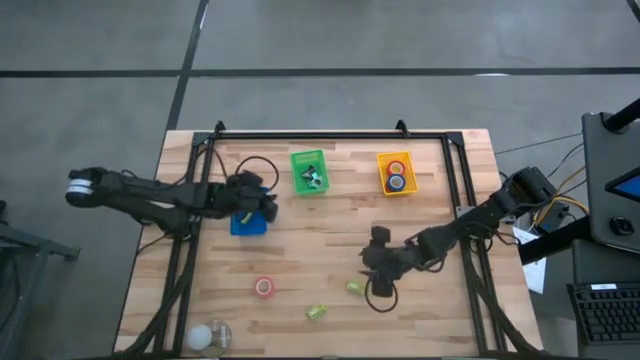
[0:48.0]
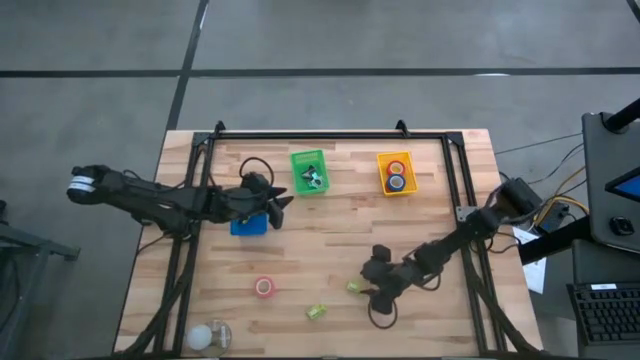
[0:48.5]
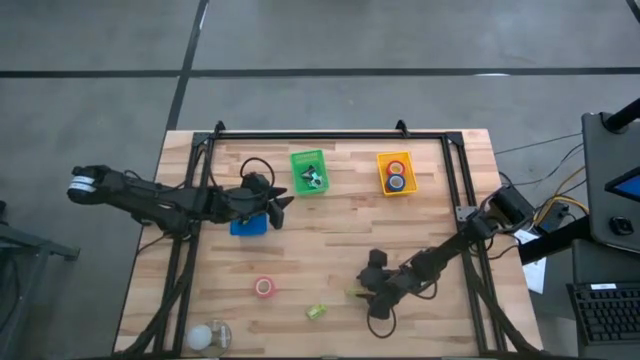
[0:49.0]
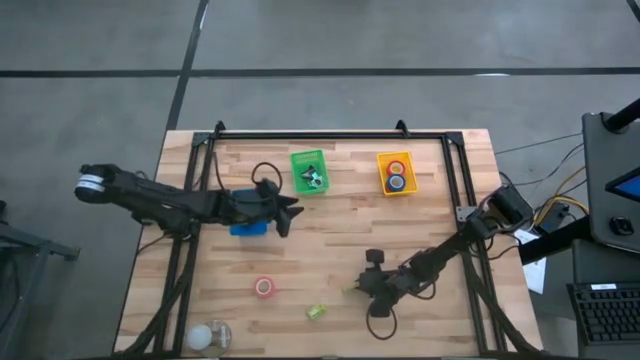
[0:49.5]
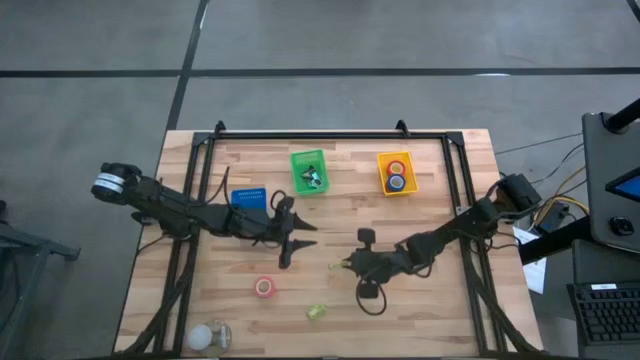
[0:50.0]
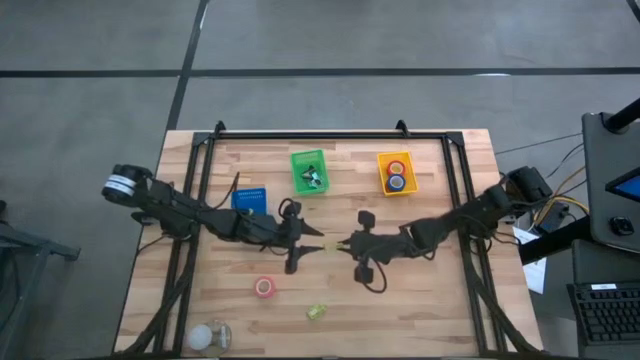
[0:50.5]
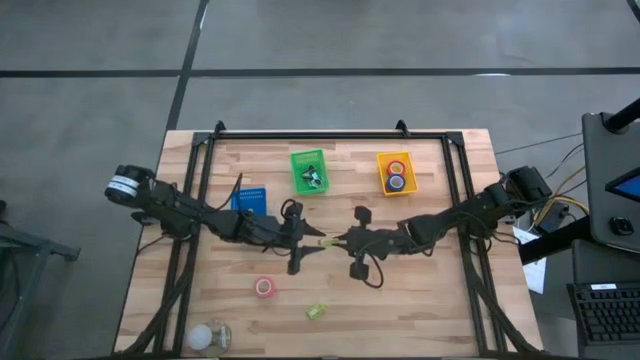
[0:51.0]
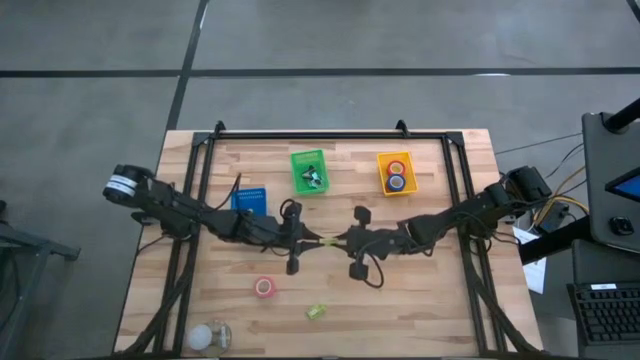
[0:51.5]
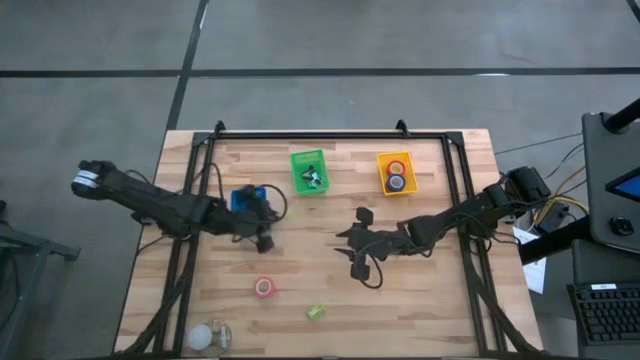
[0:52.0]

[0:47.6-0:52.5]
Task: Pick and place Stapler, Stapler remover, tape
Put the right green staple pin box into the blue bin

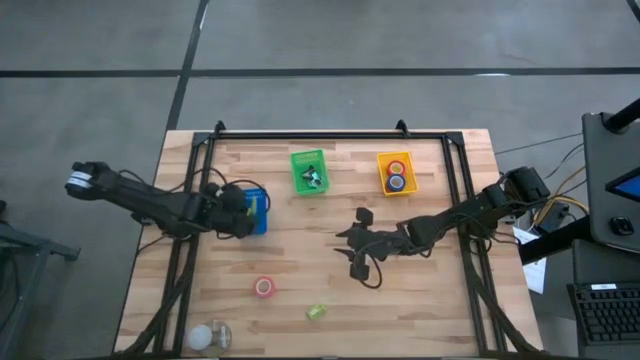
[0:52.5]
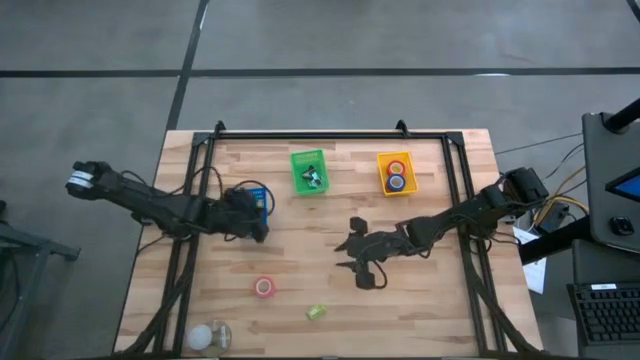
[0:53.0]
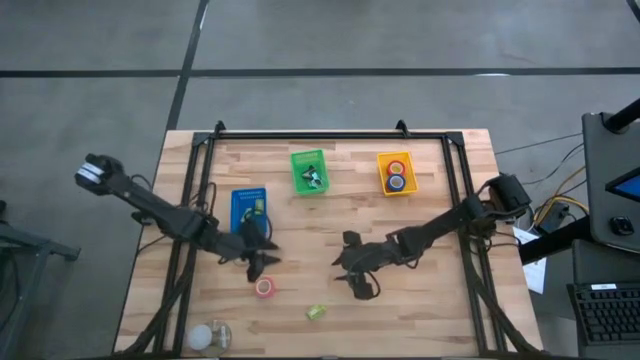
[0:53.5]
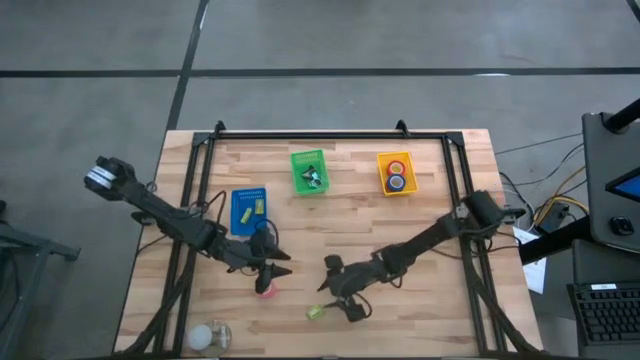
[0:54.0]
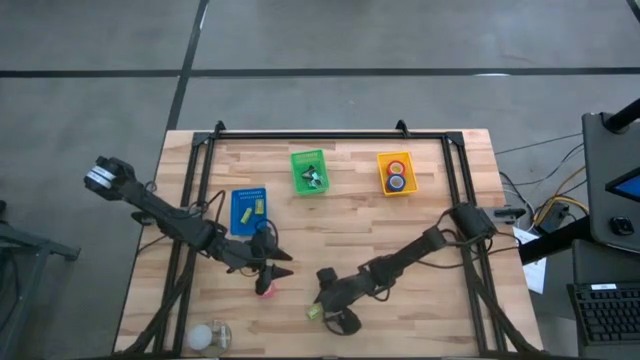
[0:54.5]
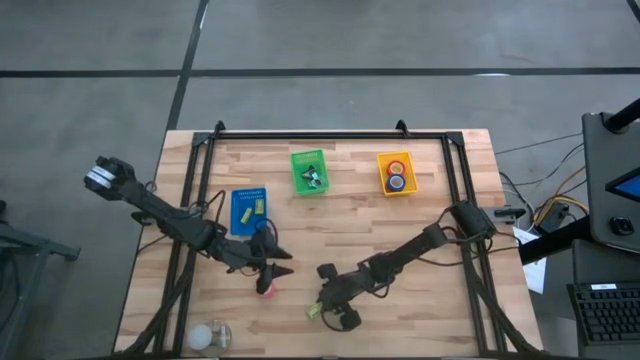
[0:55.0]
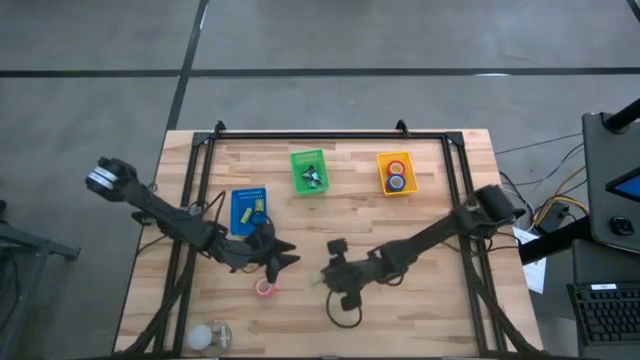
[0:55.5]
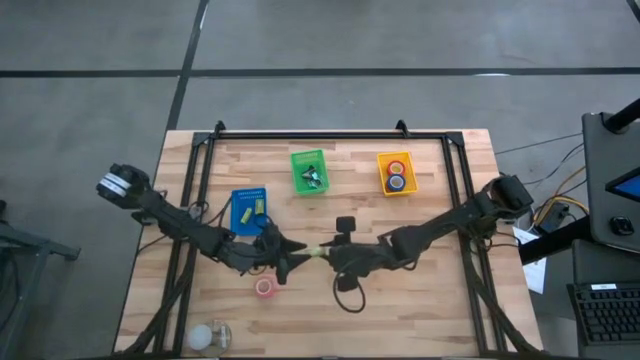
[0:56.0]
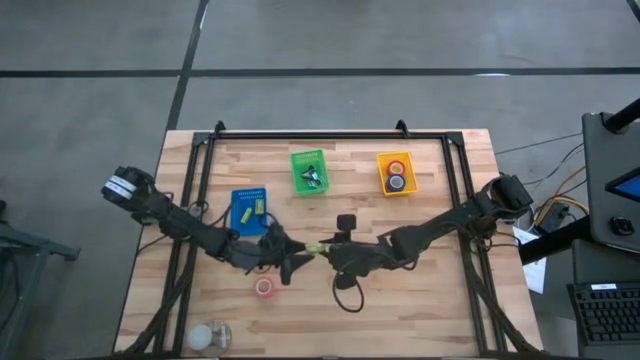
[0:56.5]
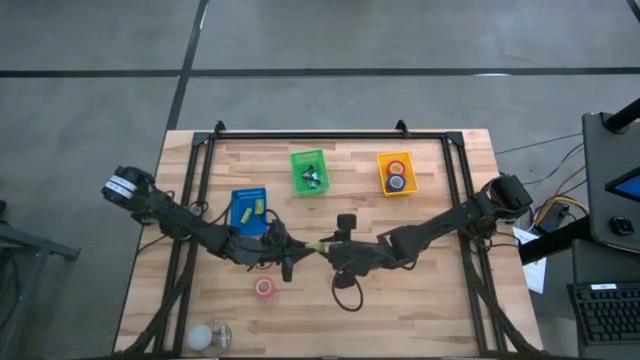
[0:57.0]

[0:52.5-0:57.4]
Put the green staple pin box into the blue bin

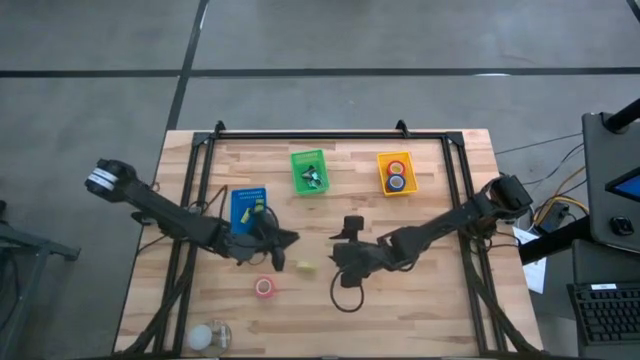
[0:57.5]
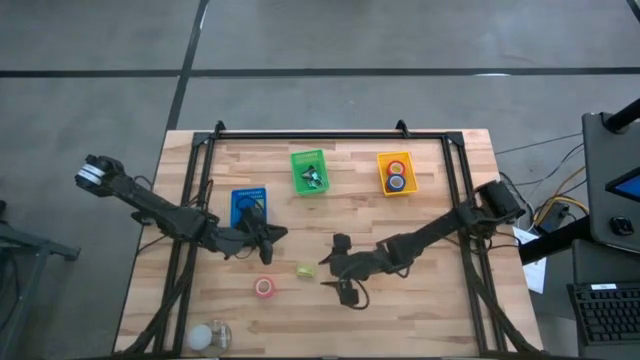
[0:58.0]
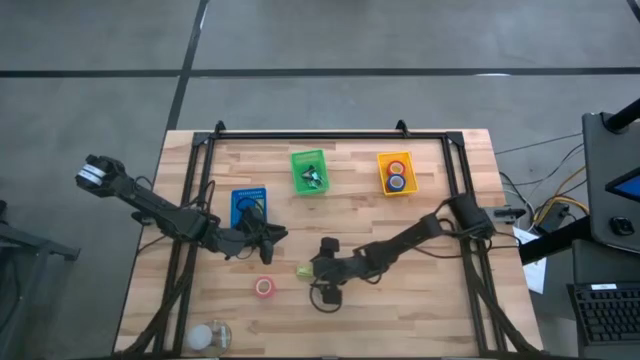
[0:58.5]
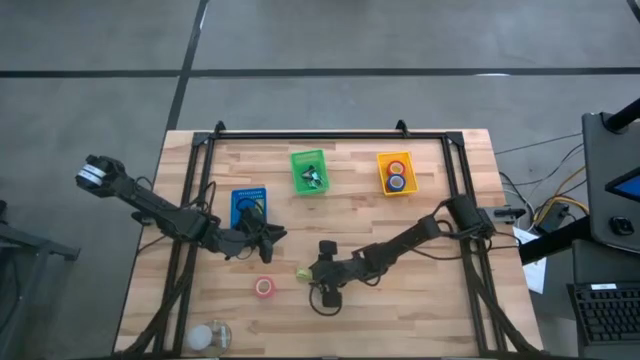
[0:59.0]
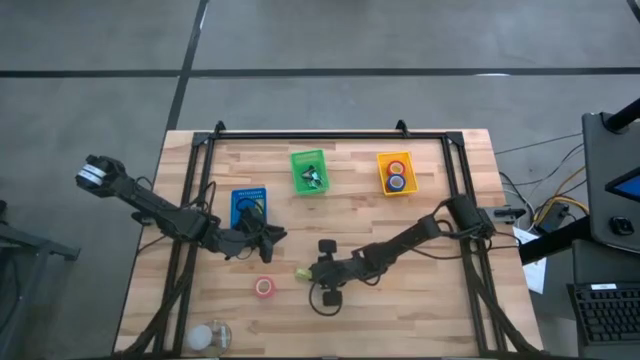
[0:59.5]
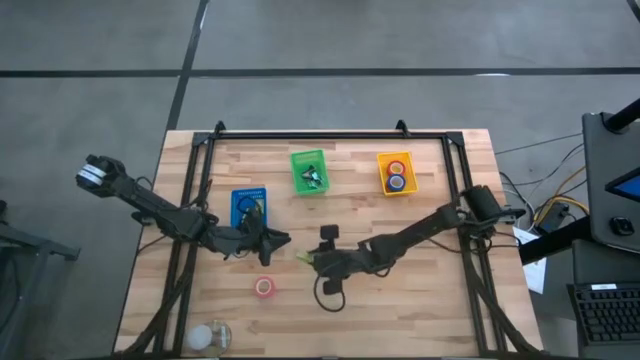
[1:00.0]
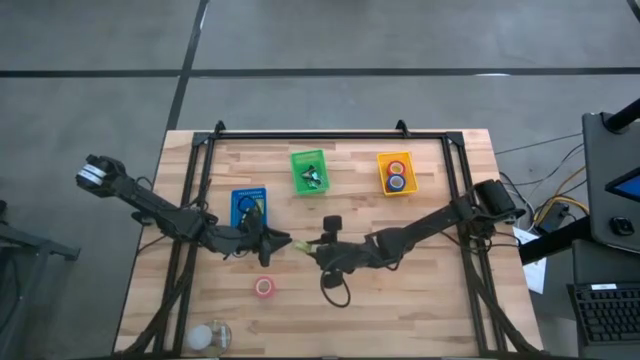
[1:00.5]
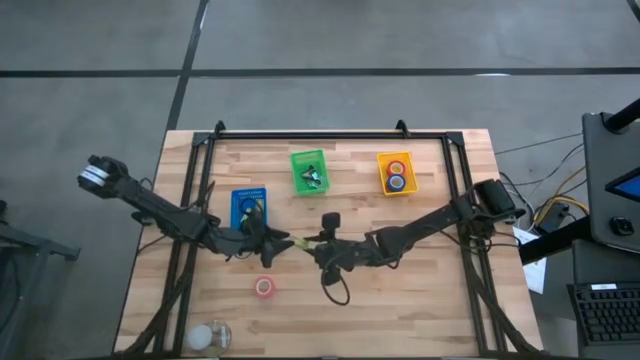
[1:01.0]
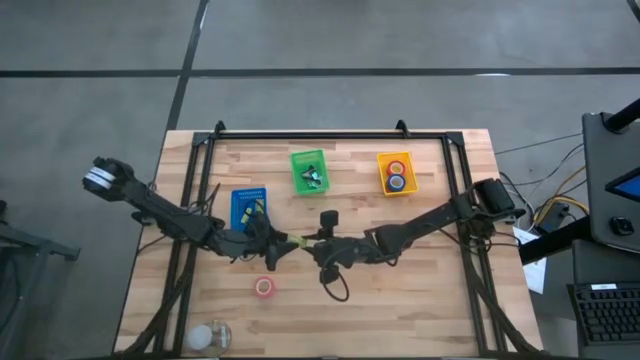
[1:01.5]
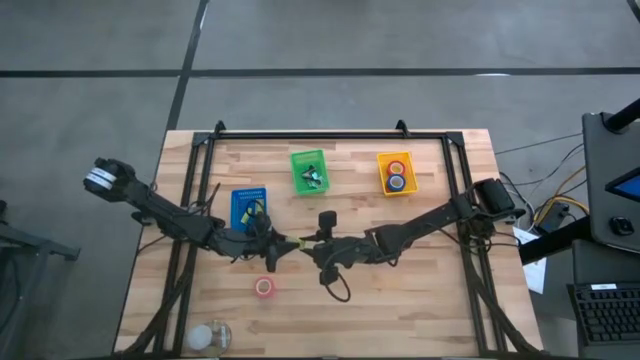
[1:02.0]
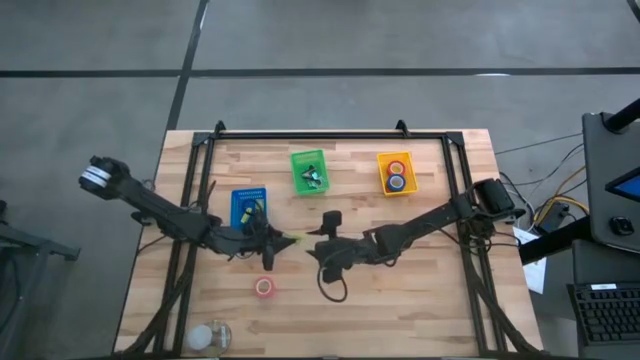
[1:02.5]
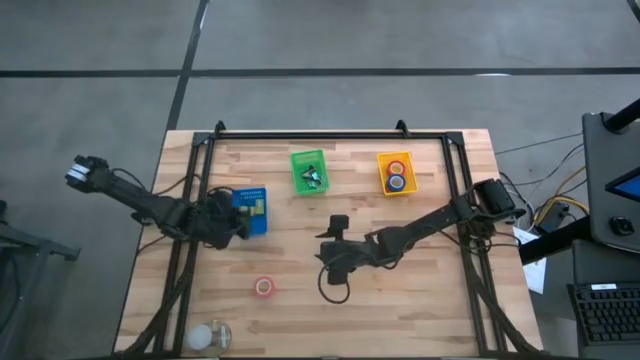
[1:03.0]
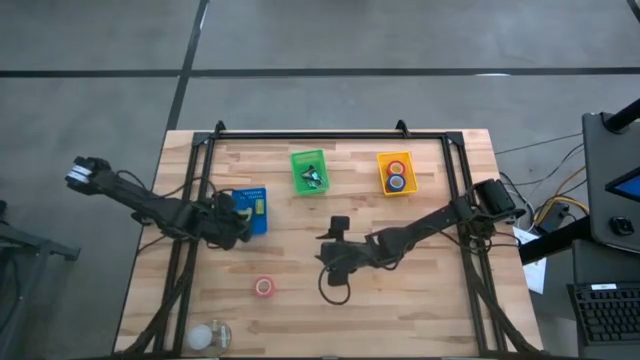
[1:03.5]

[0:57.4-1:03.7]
Put the green staple pin box into the blue bin

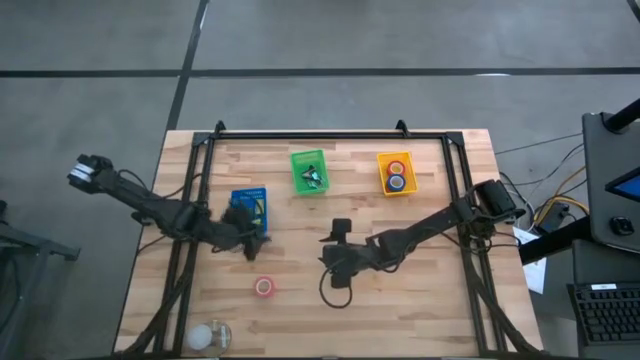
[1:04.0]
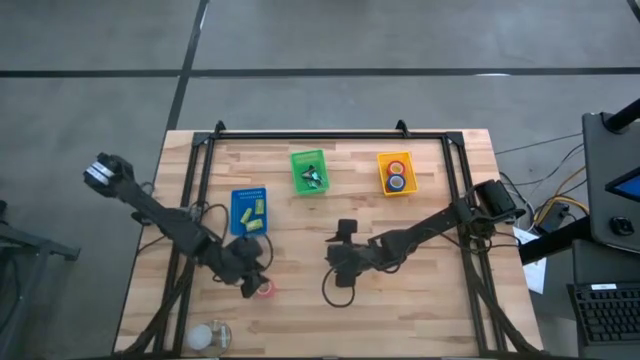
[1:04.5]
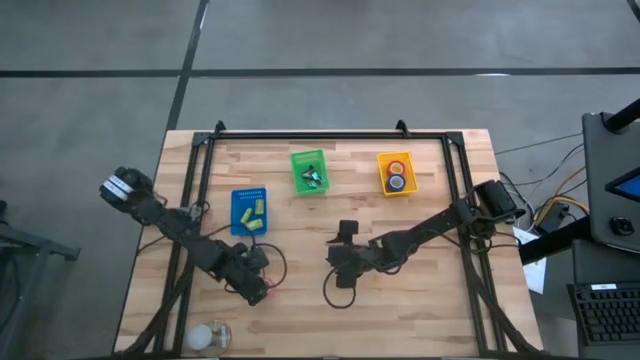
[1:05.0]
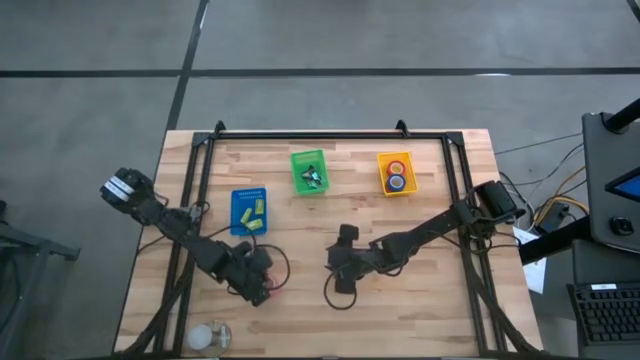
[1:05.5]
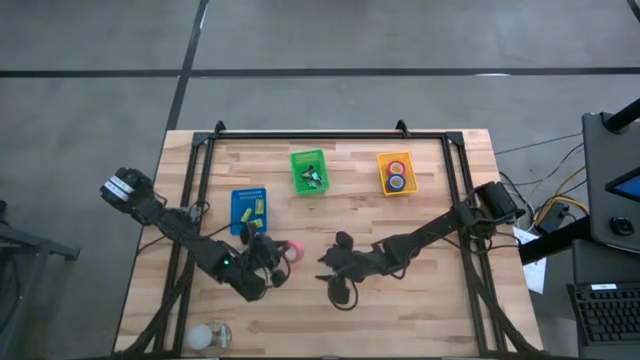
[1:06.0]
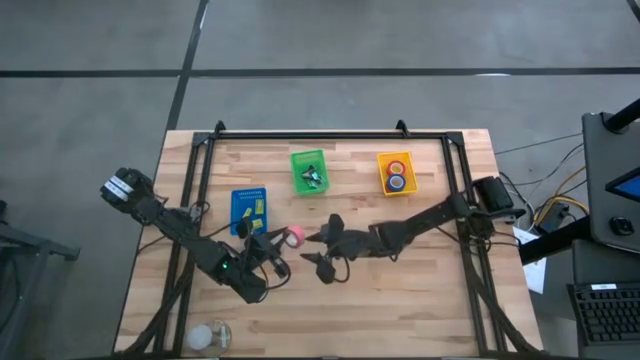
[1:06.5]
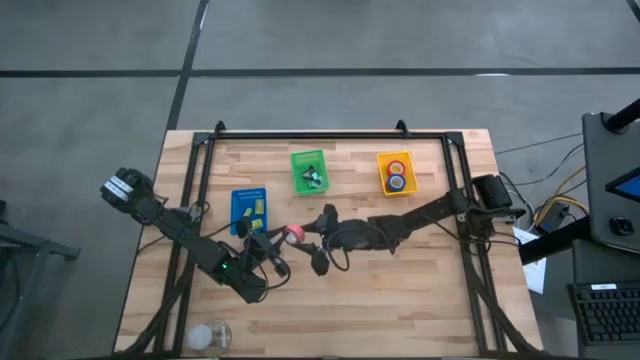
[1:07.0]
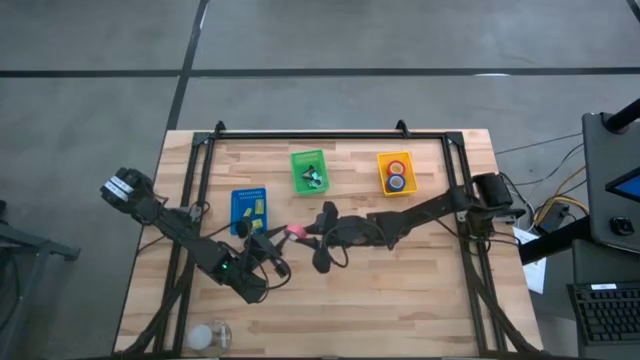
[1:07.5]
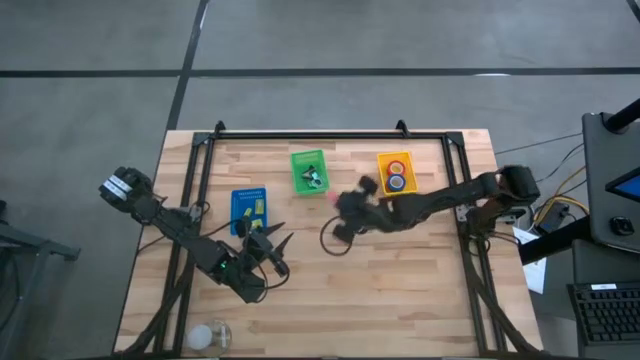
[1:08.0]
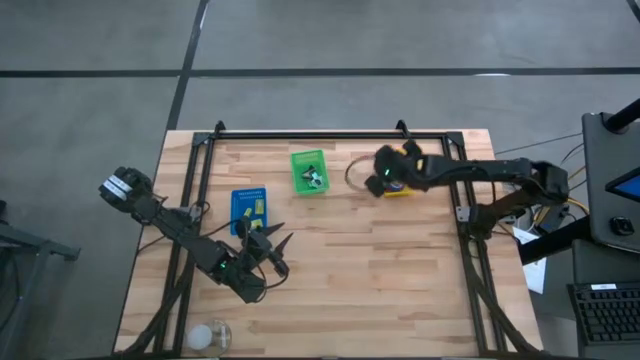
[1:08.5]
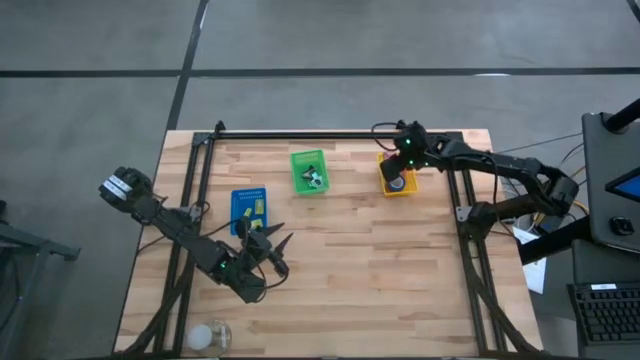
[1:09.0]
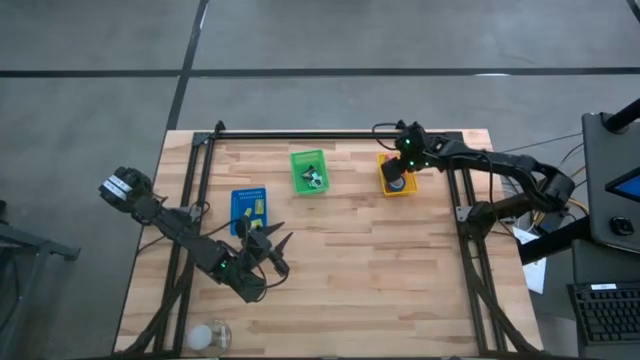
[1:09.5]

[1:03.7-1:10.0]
Put the pink tape into the yellow bin
